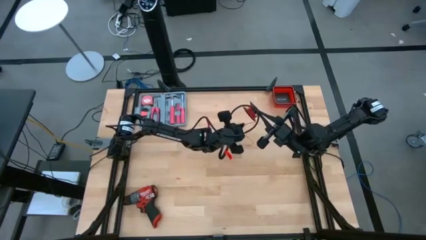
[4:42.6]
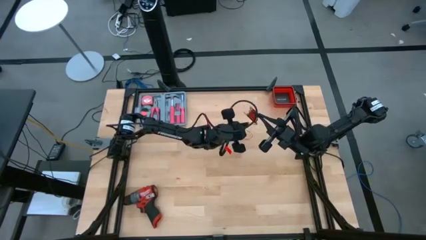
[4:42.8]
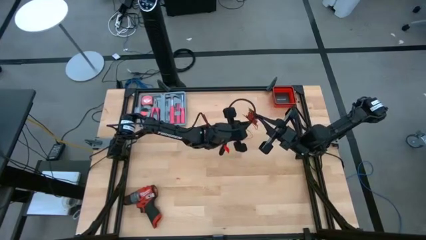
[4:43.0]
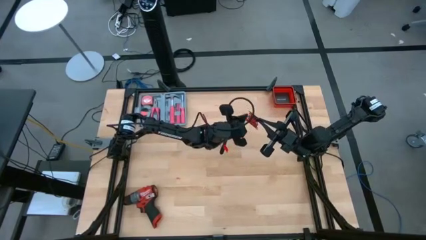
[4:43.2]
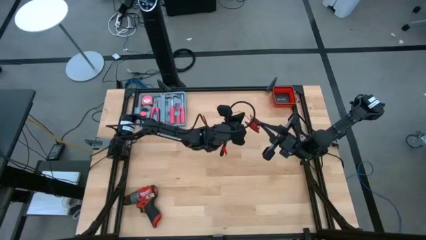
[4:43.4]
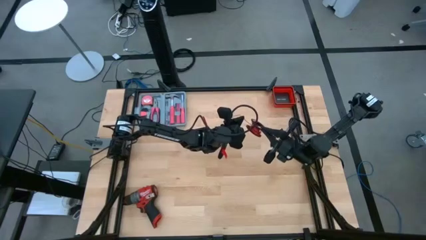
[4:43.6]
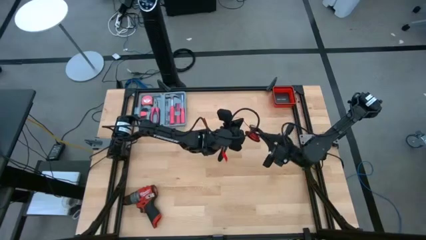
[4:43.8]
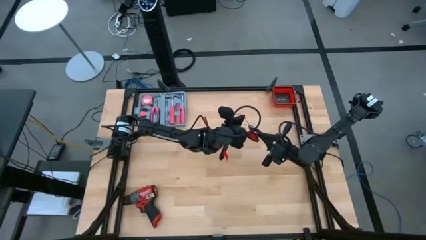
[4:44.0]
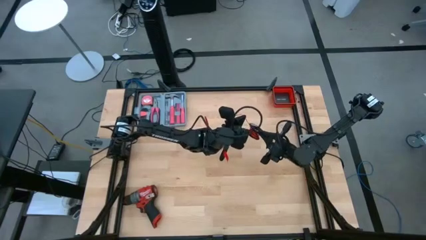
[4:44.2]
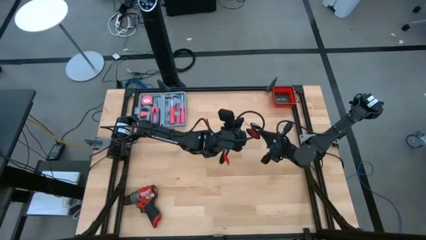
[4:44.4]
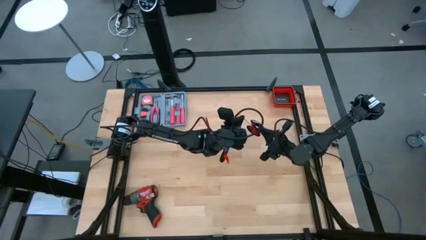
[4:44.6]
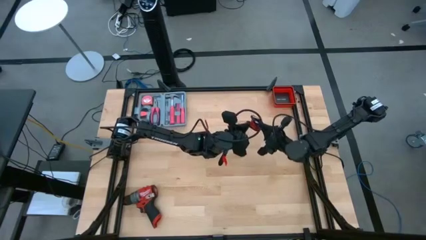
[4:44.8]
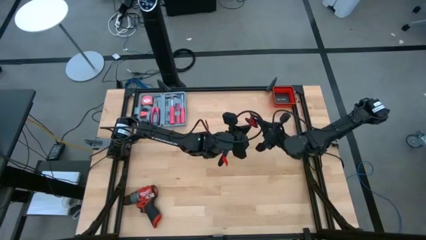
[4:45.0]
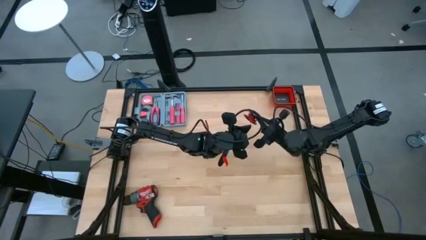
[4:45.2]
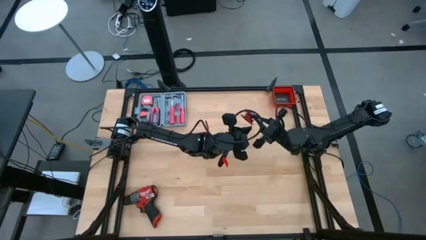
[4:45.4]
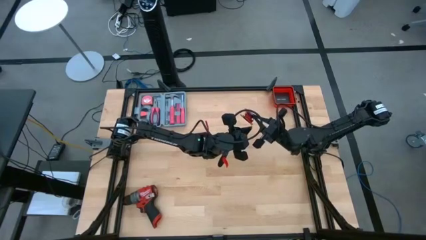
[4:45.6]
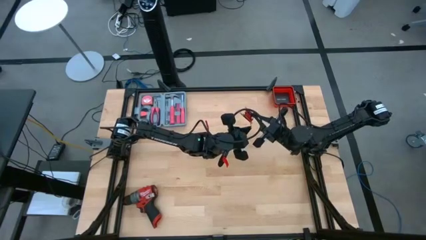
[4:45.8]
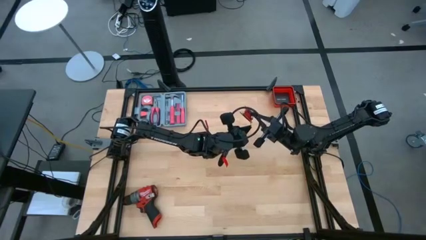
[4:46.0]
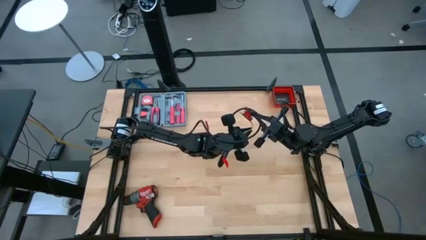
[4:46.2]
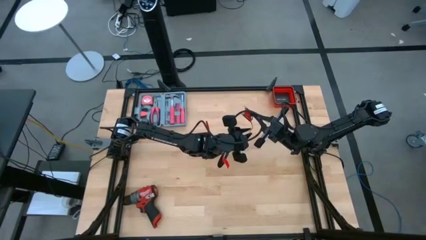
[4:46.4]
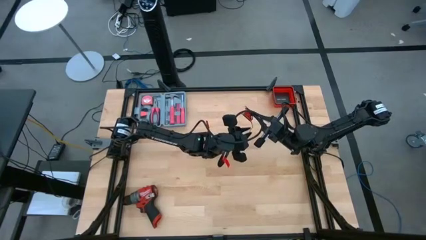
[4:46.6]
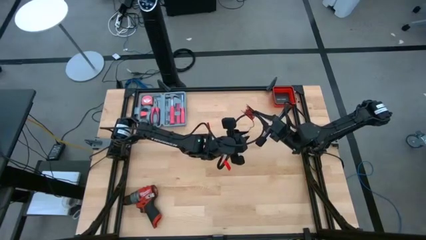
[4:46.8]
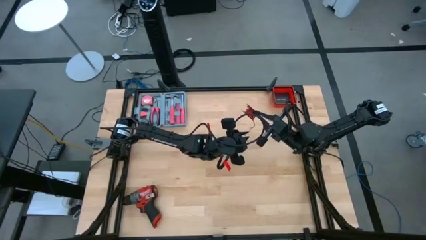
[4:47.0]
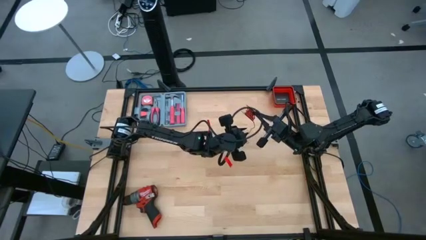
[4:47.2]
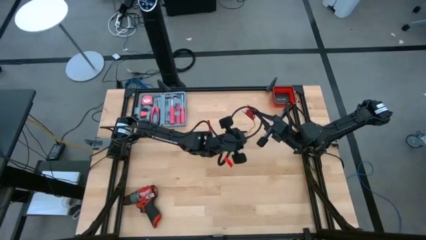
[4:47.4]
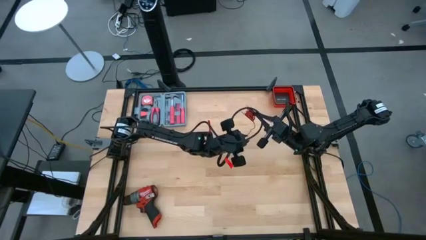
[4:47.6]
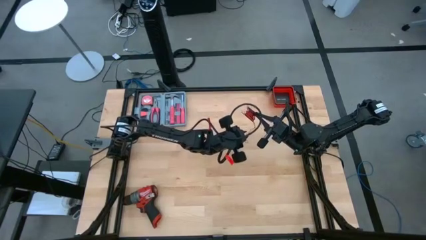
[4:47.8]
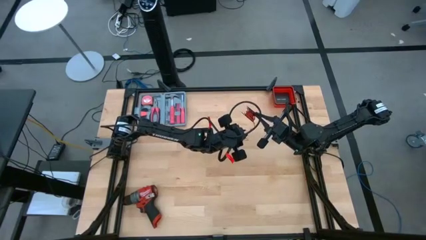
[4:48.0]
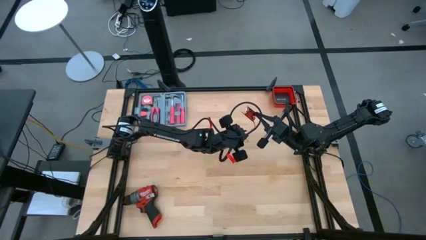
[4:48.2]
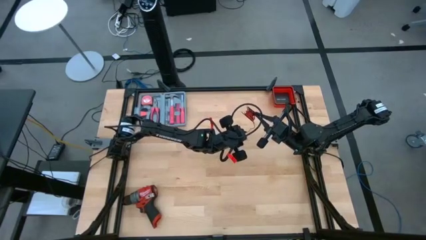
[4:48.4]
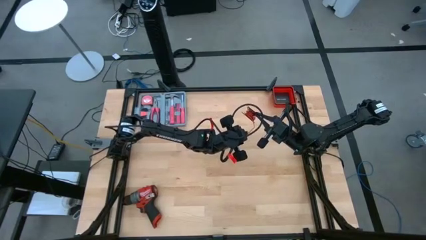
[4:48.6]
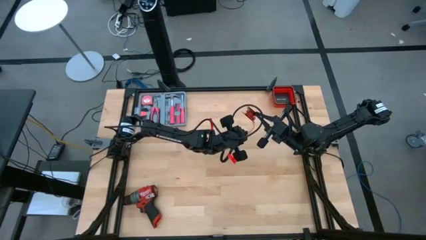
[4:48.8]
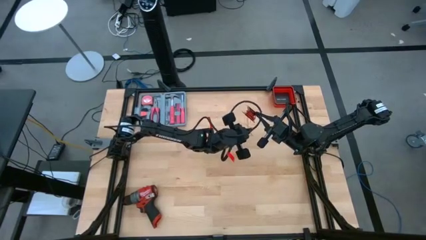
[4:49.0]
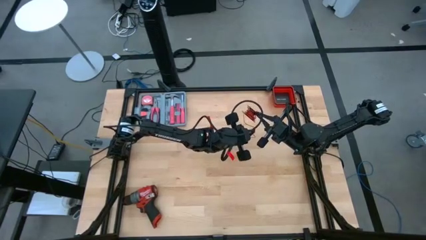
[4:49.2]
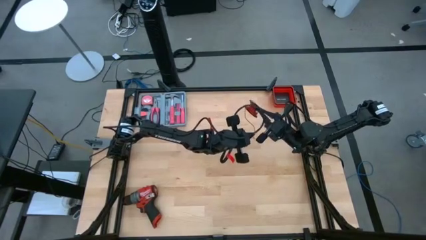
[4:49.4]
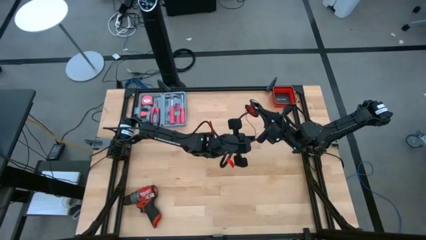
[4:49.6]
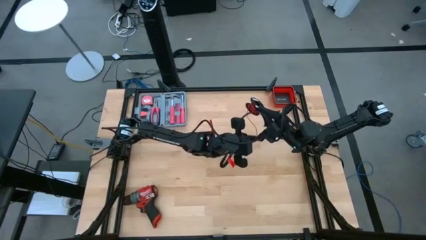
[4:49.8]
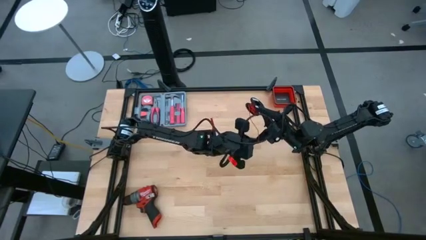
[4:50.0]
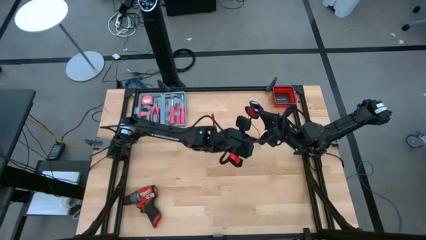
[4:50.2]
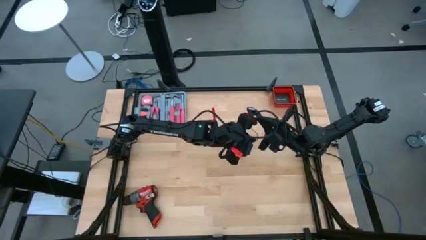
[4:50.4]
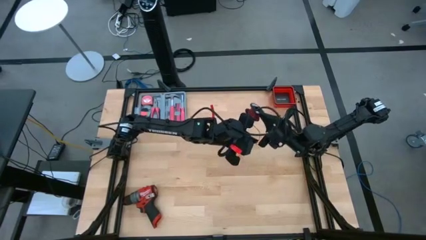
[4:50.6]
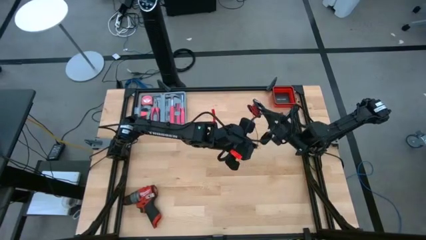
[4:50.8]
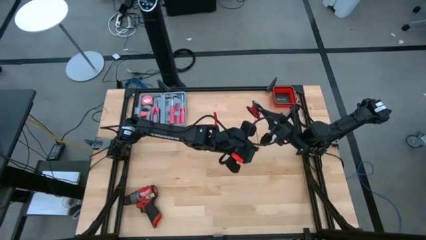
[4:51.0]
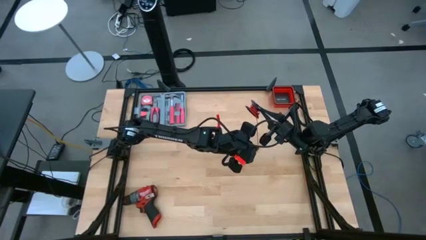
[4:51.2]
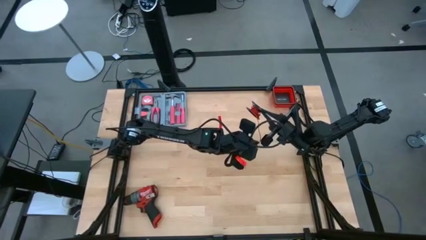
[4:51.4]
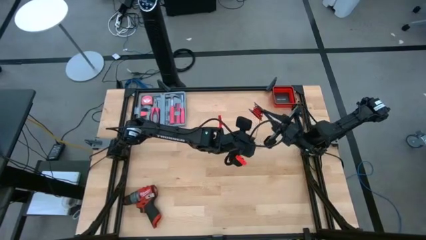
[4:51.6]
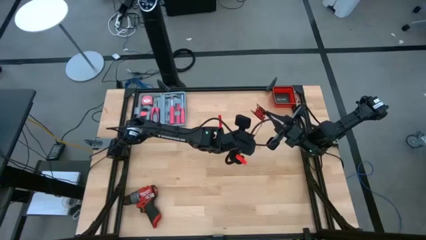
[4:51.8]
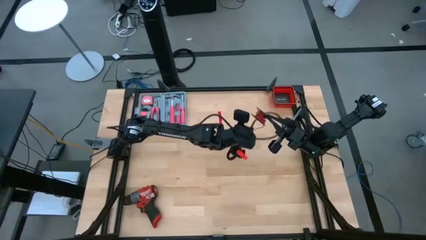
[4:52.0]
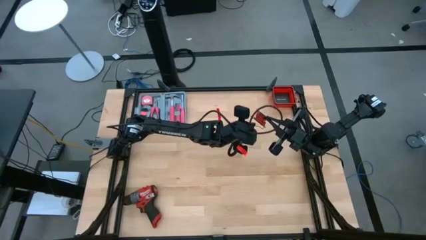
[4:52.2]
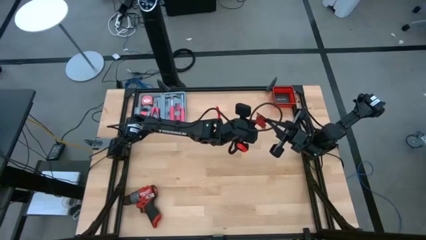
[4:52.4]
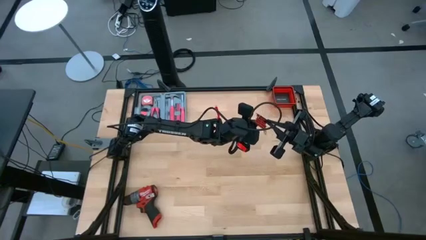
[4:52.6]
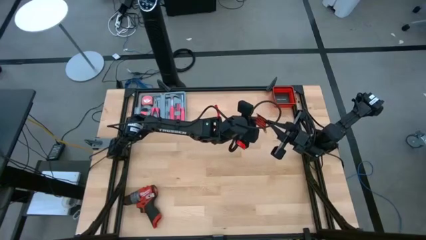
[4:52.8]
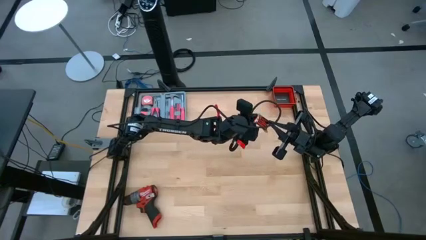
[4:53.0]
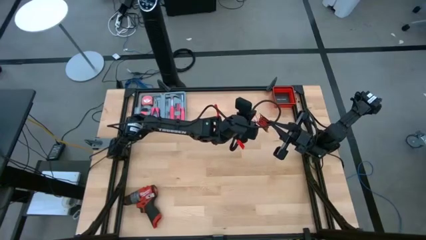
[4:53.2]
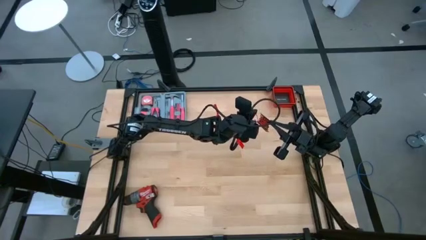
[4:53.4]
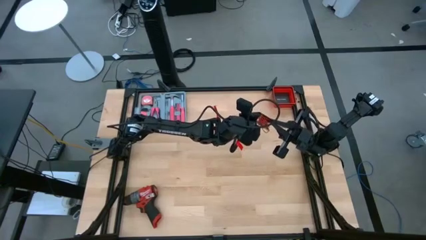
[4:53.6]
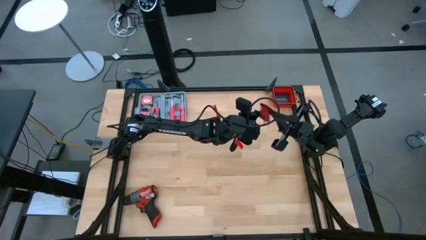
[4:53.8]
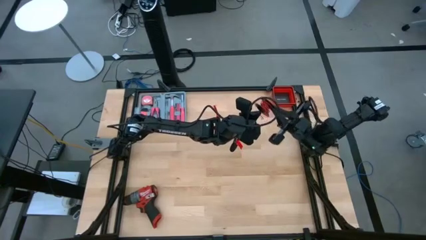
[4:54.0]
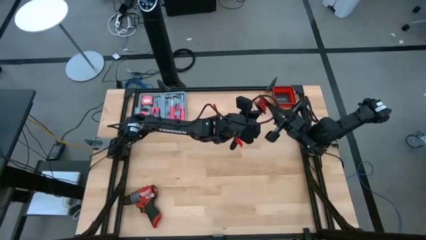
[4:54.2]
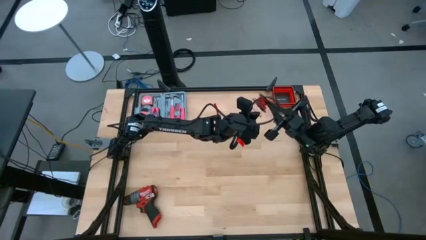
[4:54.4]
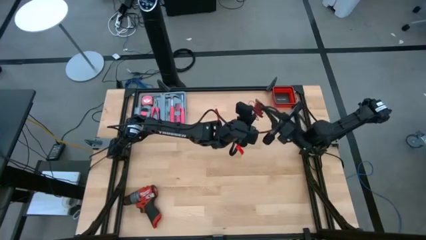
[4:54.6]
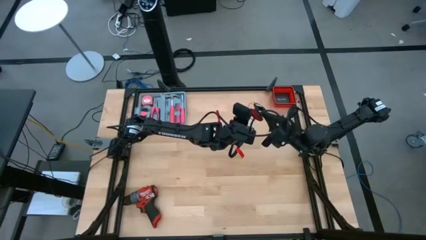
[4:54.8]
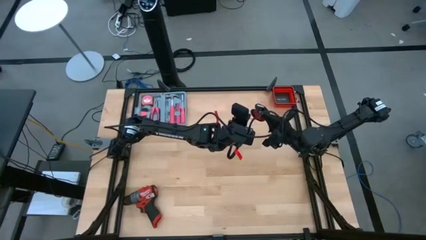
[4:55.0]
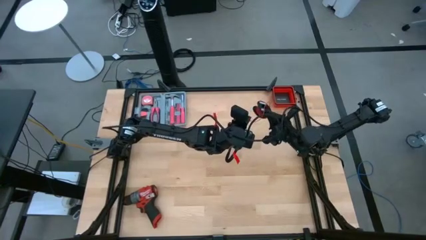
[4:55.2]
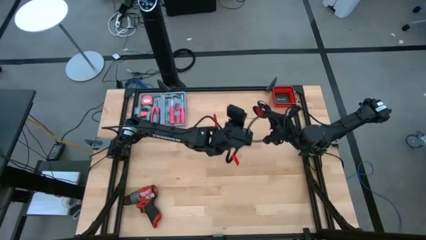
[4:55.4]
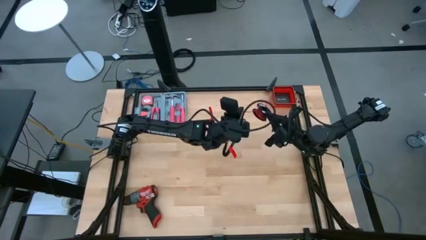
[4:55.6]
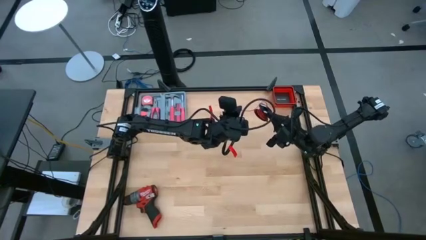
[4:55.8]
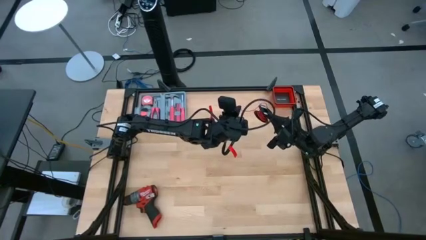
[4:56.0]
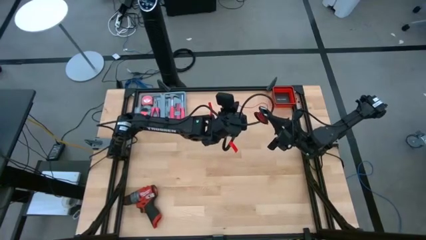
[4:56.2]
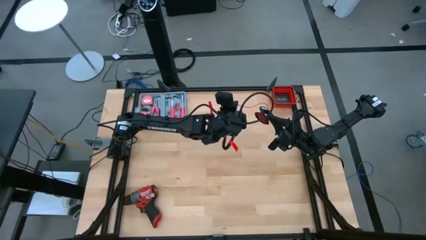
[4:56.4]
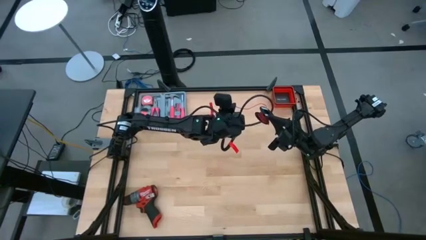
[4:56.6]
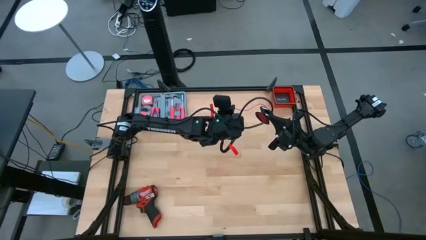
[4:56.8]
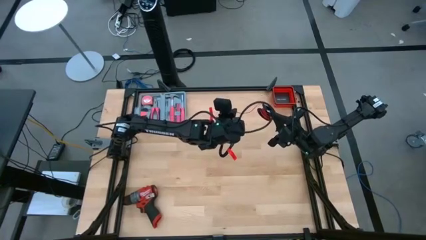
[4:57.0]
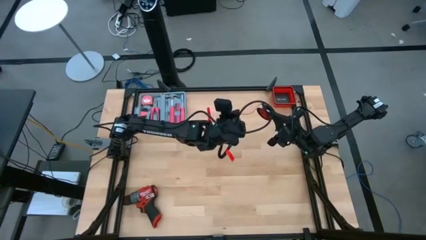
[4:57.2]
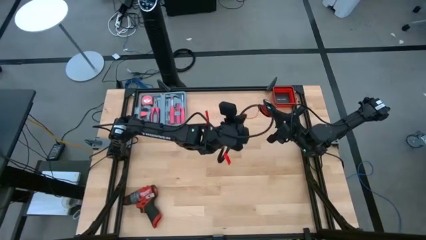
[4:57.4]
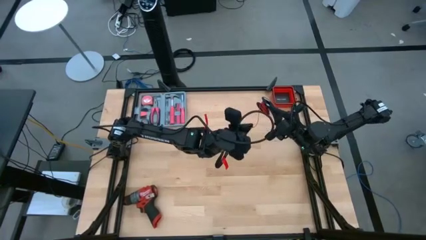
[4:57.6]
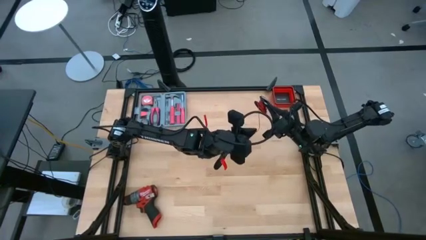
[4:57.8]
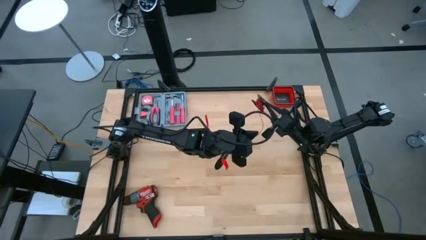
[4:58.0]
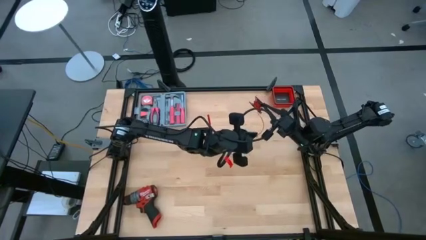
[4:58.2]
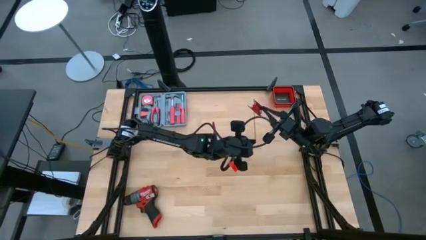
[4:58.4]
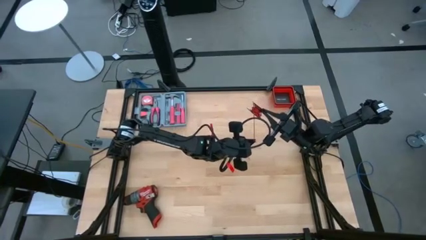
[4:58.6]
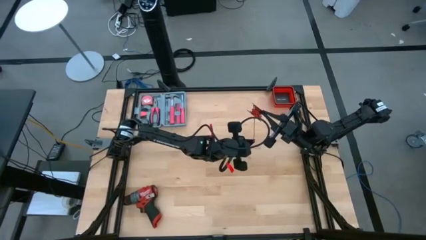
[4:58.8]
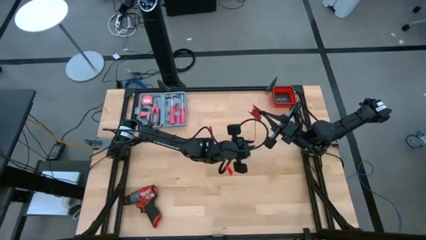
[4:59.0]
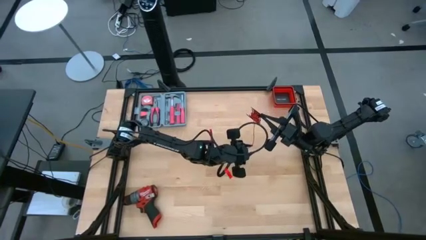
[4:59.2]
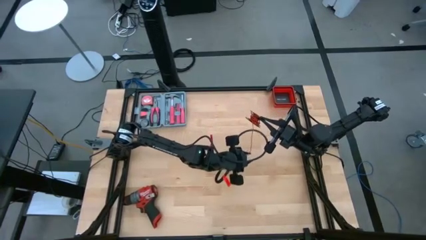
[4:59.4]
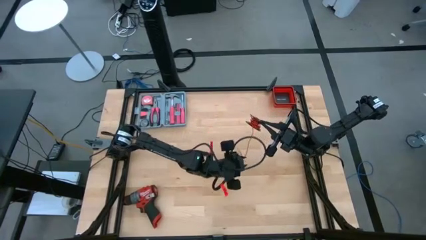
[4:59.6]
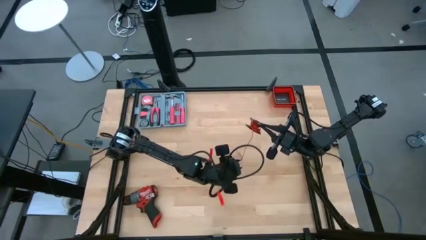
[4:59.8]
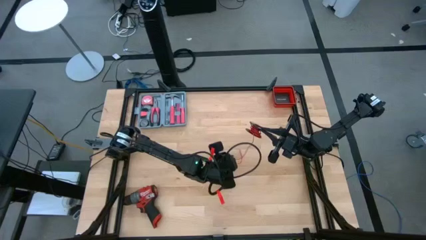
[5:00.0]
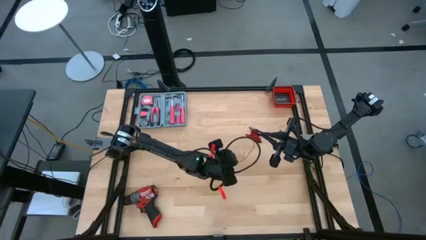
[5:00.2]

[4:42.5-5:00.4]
Task: Coil cords
Coil the red wire on the black spool
